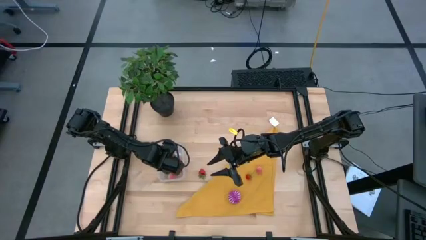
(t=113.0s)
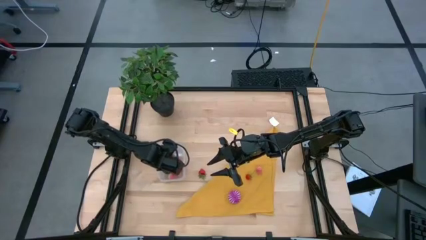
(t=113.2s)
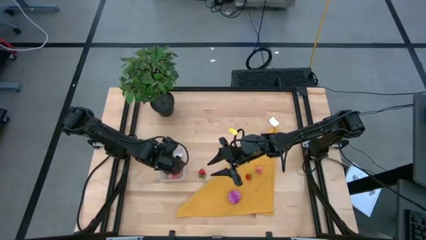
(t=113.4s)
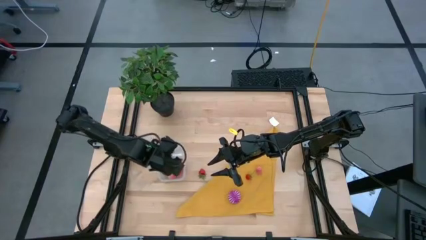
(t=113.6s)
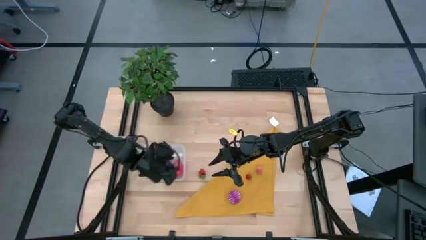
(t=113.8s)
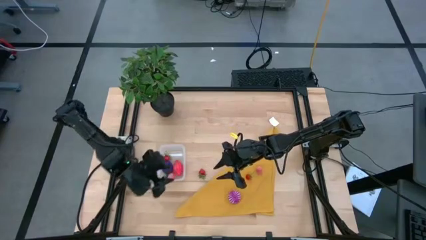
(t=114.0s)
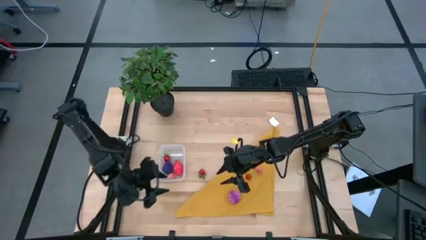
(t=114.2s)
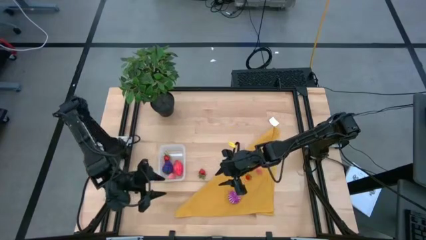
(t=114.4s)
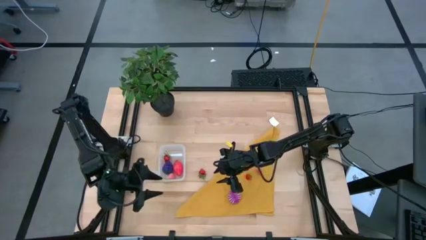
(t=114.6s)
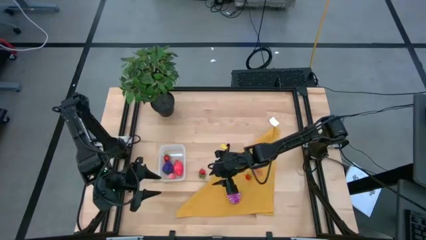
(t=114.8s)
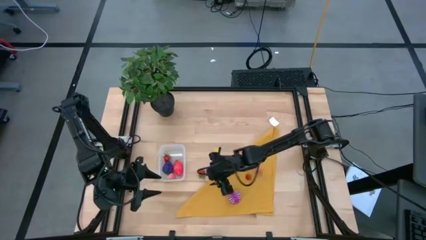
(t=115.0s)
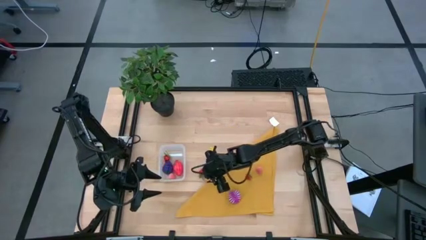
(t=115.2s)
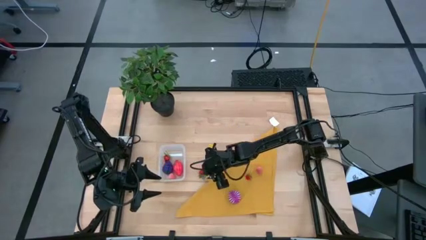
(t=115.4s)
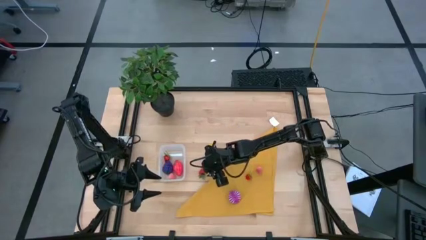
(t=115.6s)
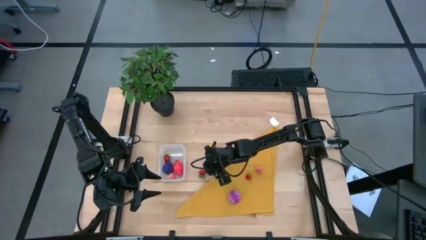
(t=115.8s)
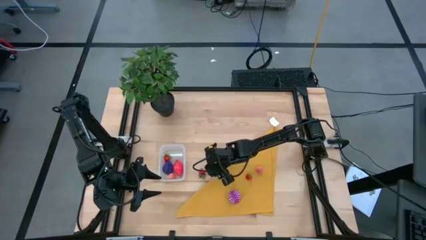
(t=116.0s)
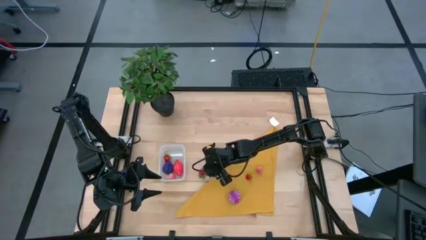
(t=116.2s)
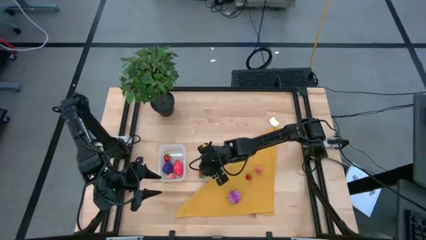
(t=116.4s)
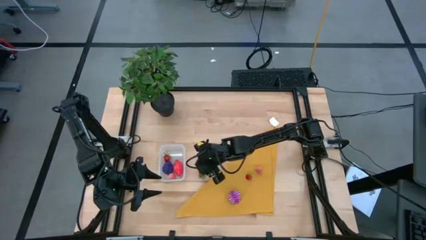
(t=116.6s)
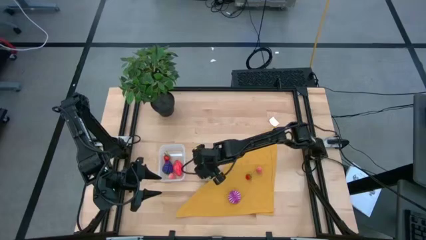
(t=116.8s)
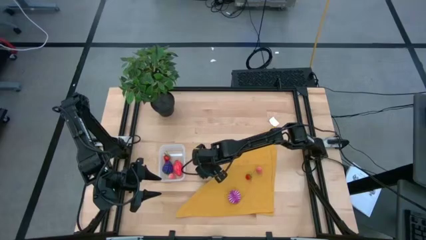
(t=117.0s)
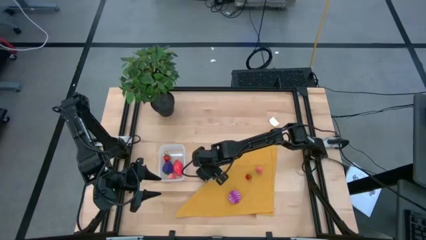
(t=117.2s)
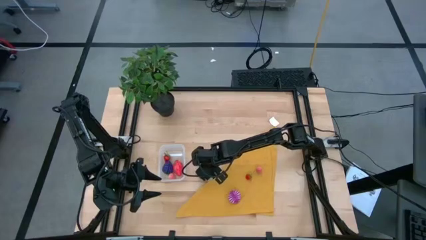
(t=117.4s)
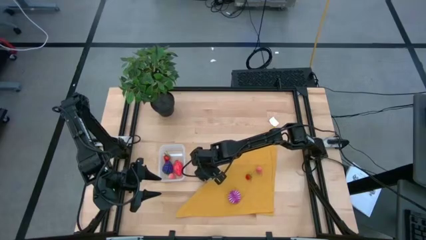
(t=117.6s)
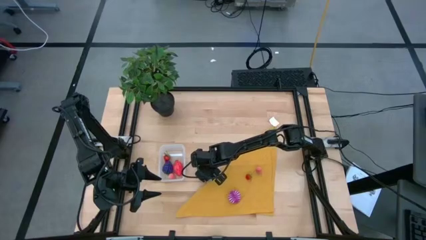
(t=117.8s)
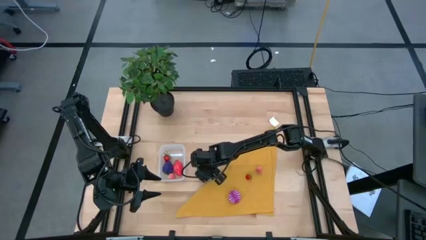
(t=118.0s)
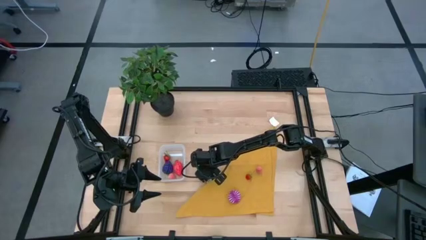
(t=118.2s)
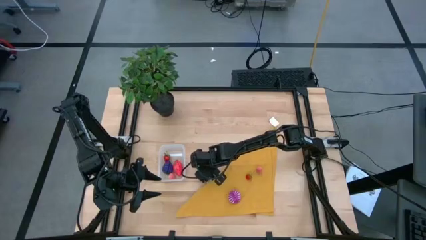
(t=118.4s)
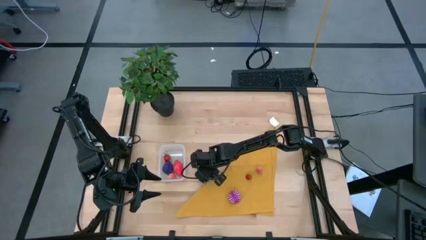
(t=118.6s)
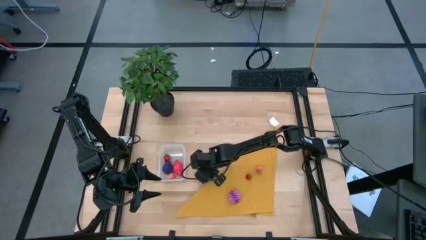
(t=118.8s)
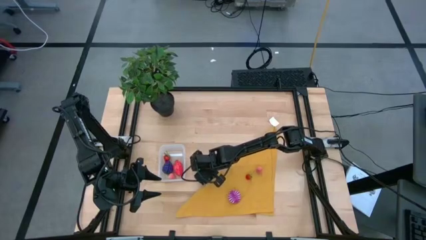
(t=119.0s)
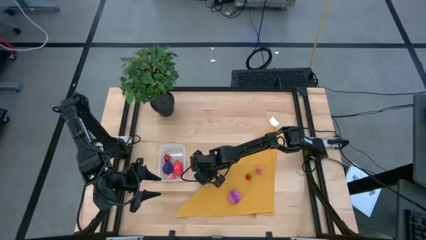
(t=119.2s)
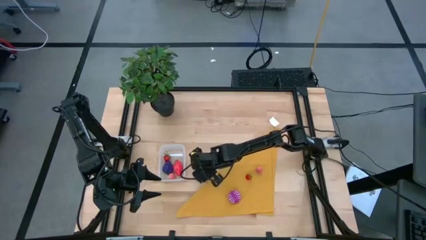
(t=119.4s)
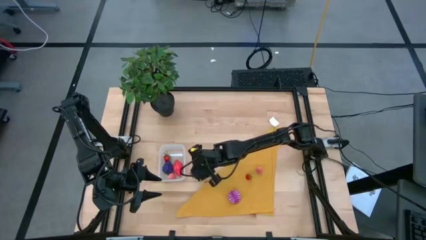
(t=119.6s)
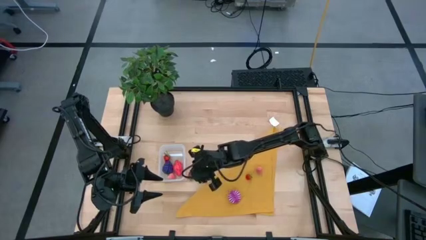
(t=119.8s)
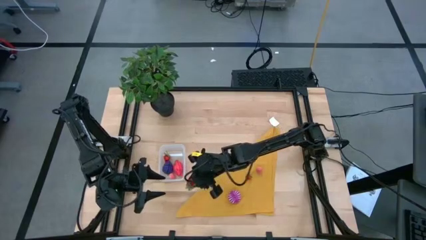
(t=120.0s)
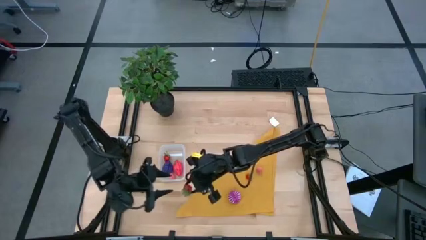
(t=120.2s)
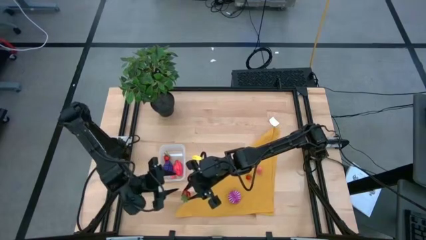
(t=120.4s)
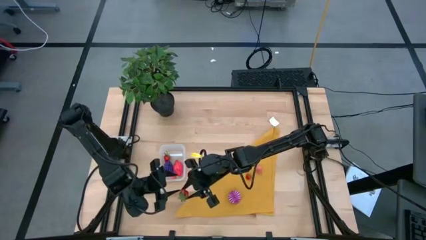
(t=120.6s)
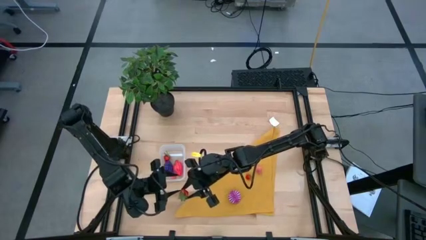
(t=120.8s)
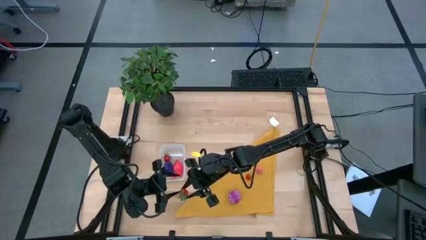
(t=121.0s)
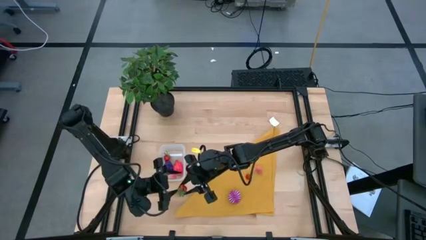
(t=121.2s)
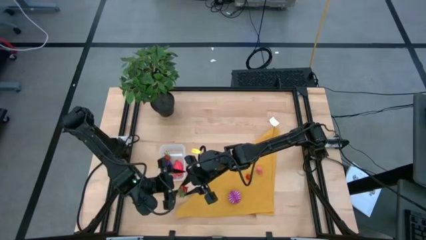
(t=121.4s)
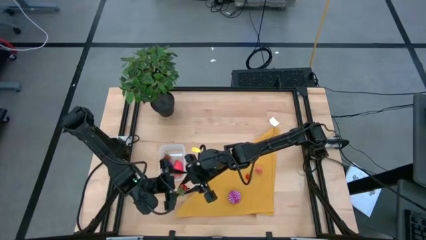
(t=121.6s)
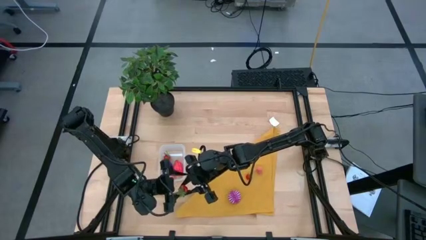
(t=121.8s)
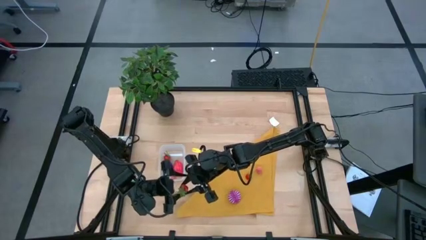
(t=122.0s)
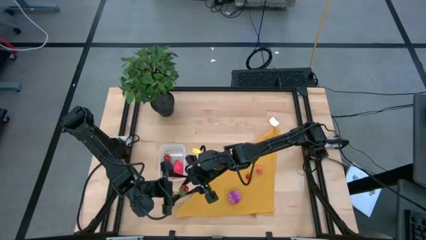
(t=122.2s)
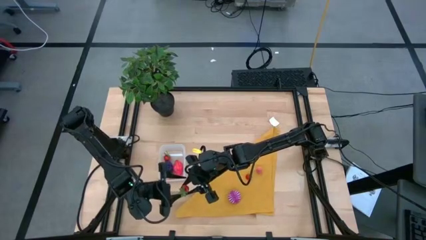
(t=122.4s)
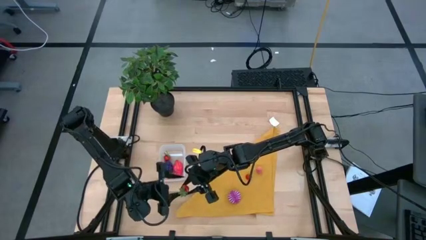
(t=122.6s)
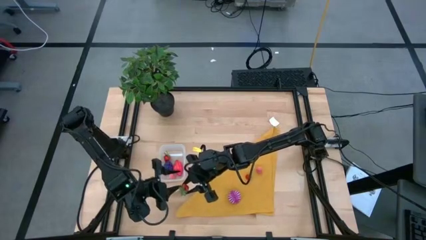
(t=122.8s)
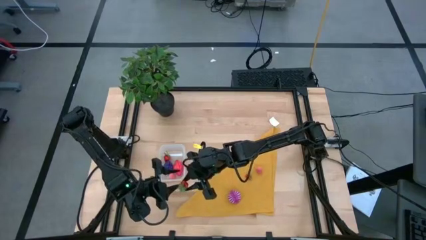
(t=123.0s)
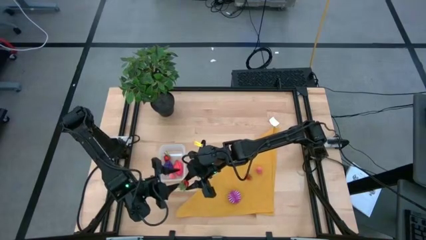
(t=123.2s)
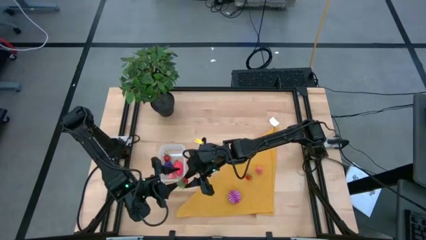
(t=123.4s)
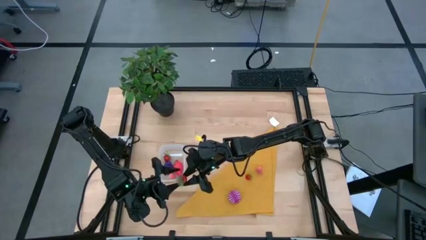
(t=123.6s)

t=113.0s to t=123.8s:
Task: Pick and placing Produce into tupperware
Put the left red strawberry into the transparent bin

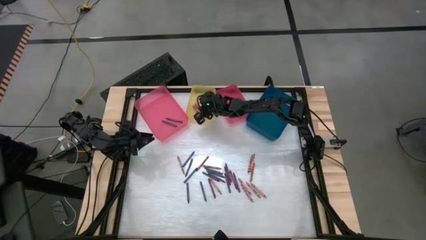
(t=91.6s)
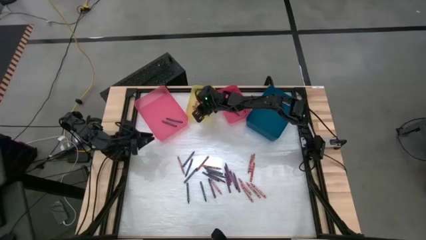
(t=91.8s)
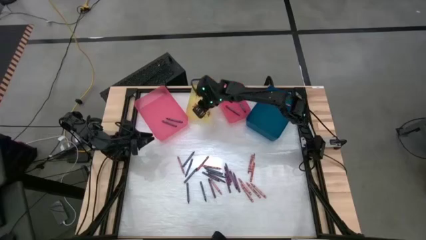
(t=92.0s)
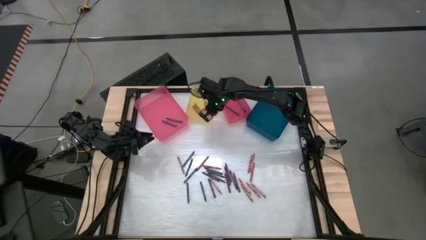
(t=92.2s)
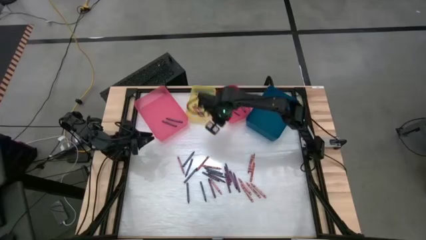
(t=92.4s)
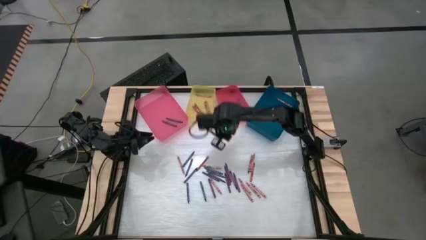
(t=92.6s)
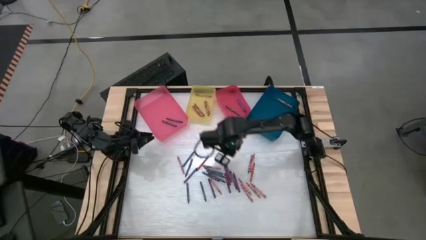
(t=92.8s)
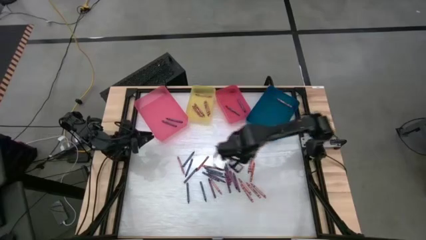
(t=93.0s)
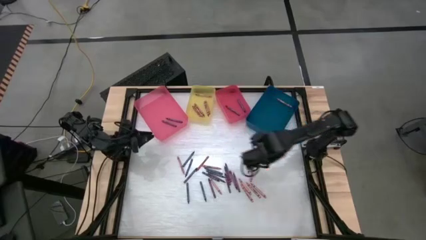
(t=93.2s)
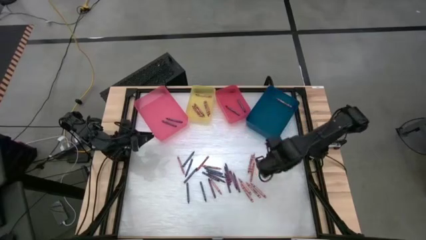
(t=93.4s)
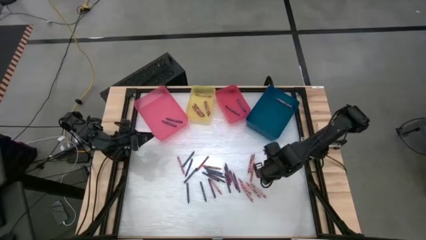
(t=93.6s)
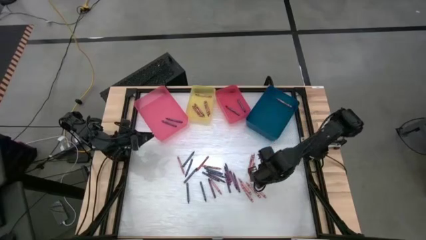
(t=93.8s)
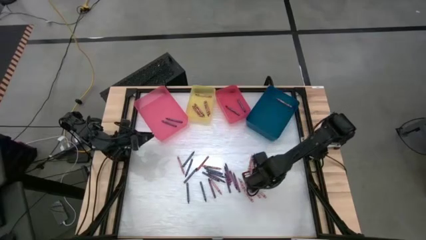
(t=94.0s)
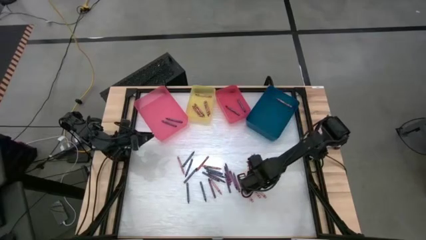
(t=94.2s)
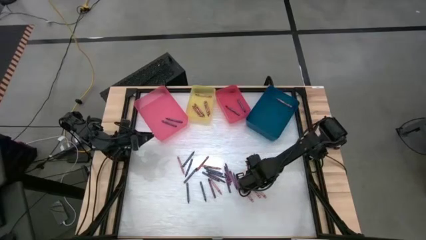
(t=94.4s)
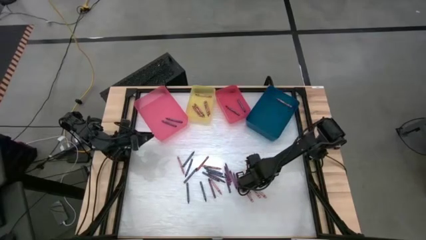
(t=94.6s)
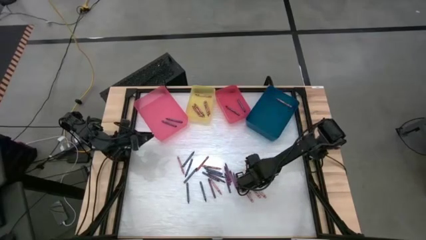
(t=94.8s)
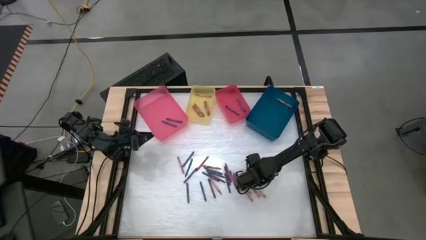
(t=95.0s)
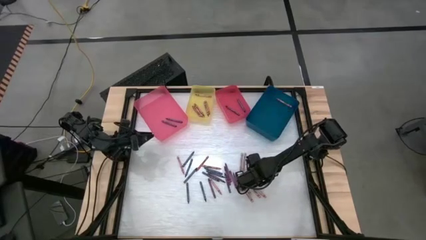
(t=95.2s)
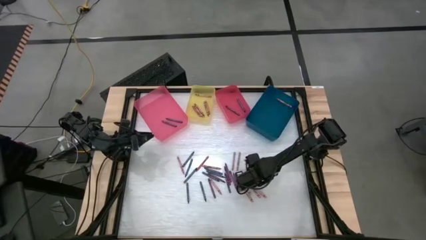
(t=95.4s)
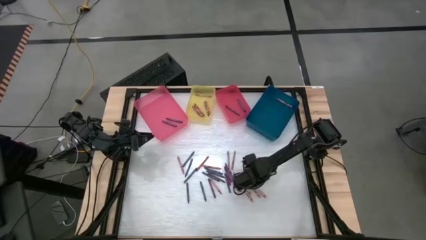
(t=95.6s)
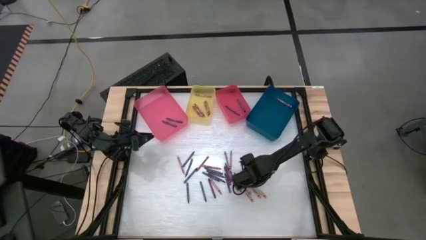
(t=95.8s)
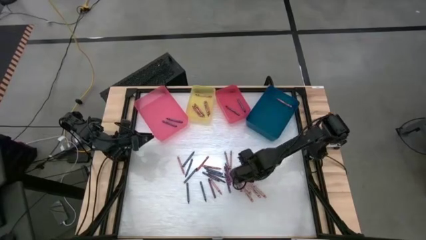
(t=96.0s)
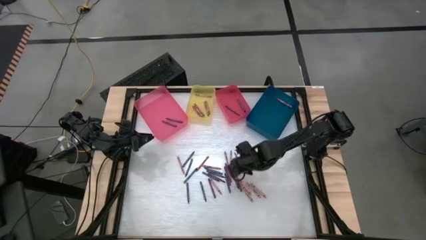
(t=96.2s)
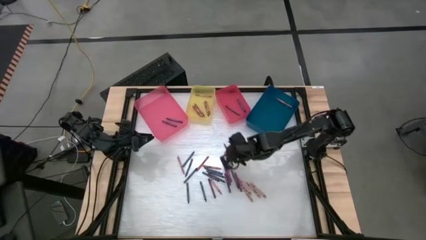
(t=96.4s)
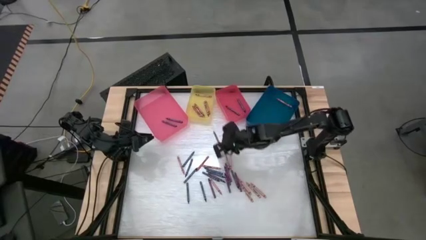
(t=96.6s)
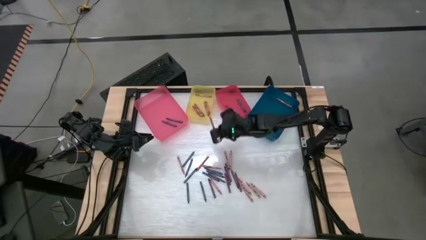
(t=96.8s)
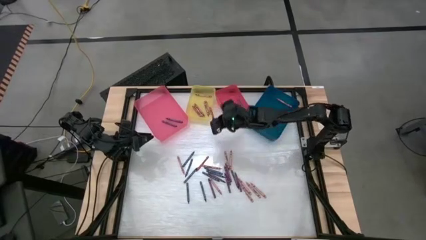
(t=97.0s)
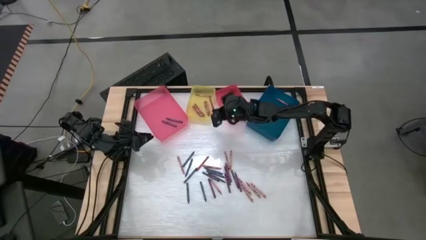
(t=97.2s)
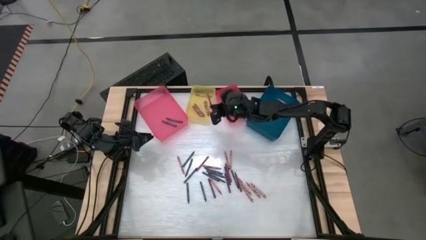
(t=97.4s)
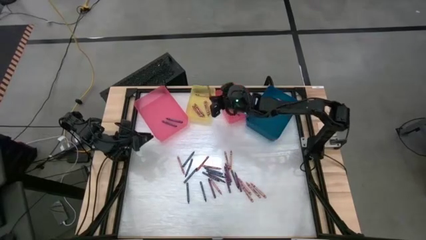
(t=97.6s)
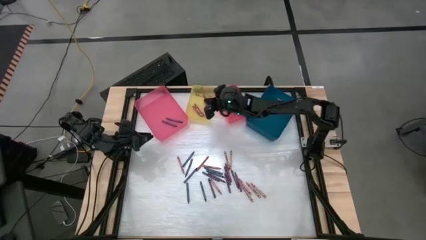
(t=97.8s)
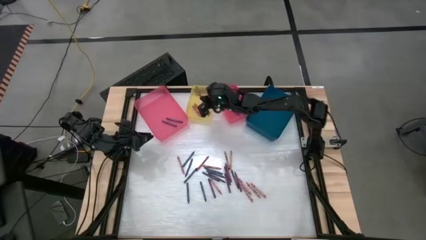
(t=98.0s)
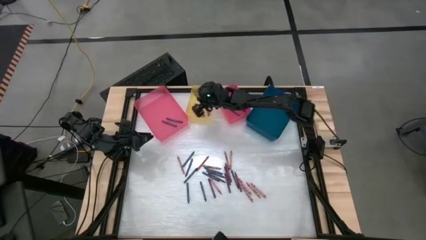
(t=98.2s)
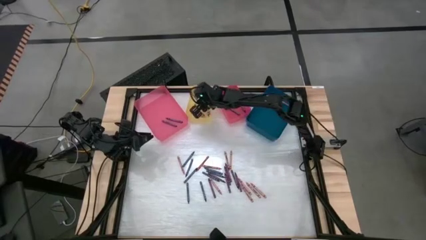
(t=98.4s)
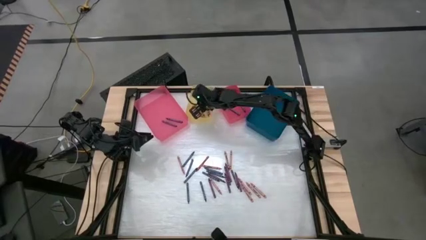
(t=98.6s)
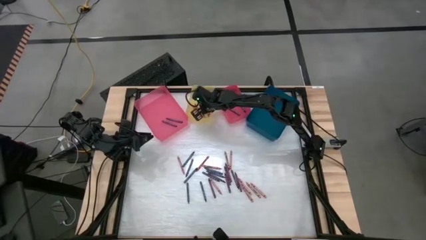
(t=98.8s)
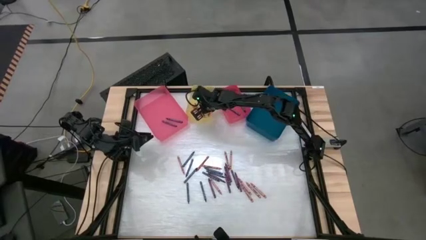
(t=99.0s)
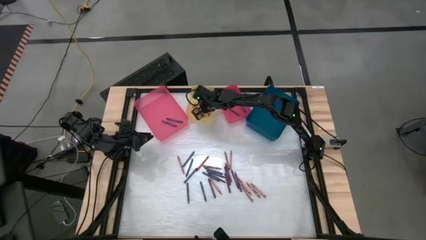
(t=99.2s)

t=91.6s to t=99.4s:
Task: Sort crayons
Put the red crayon into the yellow bin
